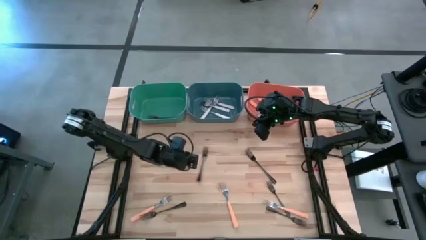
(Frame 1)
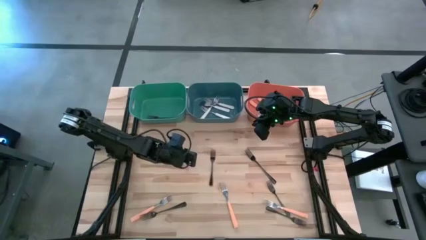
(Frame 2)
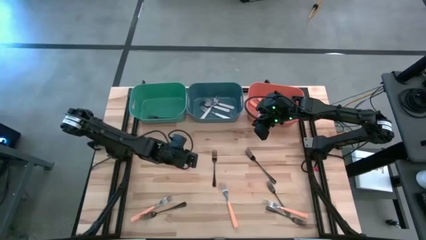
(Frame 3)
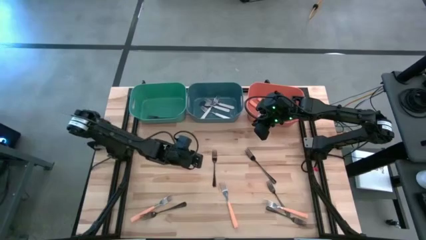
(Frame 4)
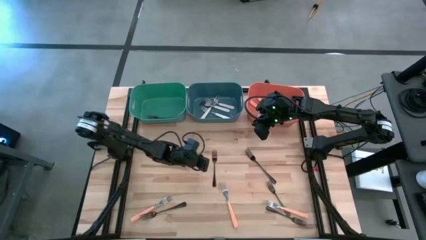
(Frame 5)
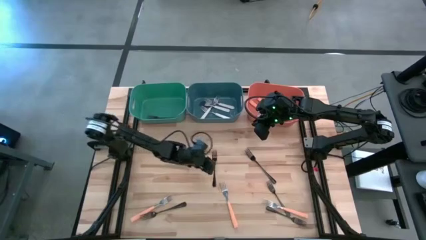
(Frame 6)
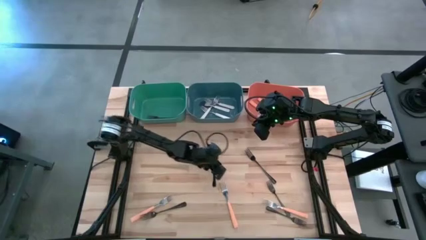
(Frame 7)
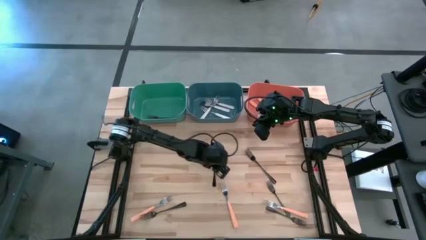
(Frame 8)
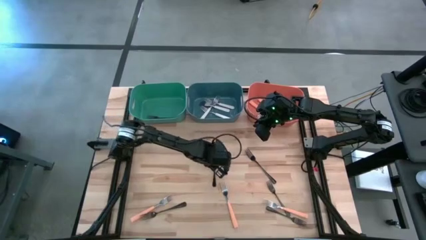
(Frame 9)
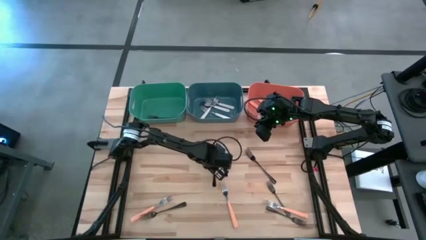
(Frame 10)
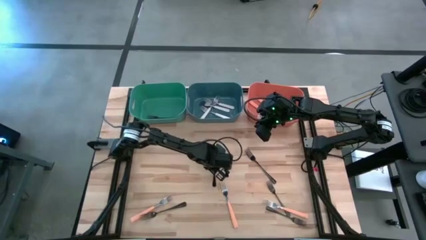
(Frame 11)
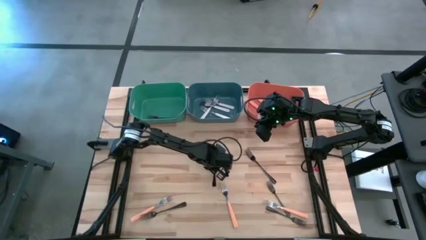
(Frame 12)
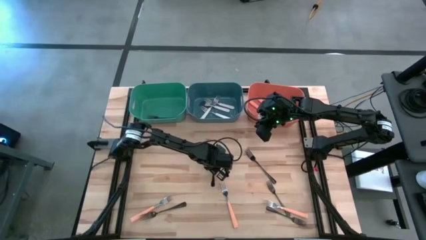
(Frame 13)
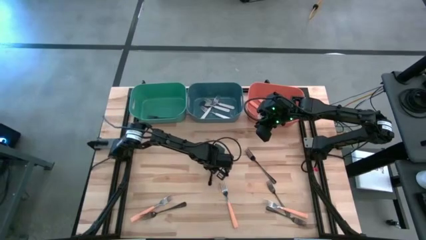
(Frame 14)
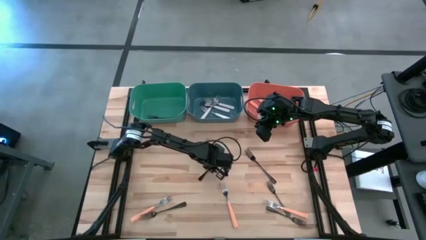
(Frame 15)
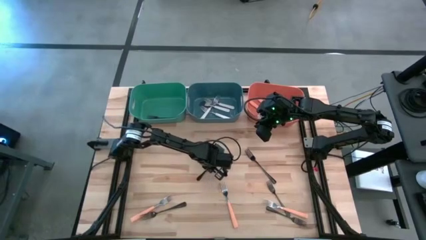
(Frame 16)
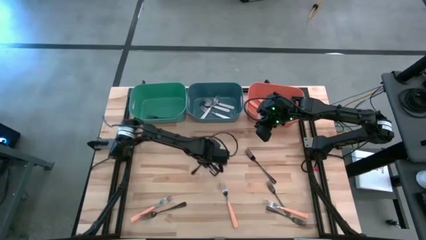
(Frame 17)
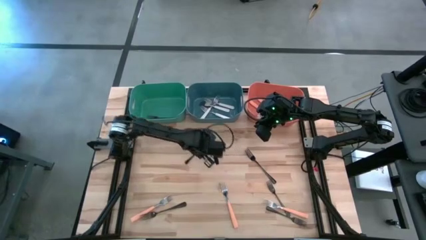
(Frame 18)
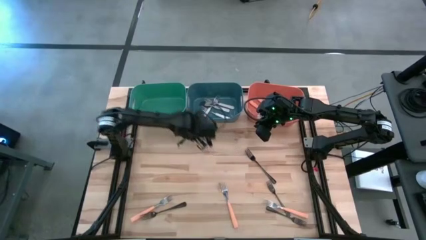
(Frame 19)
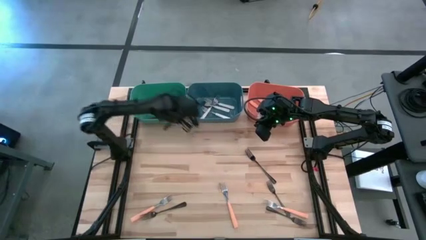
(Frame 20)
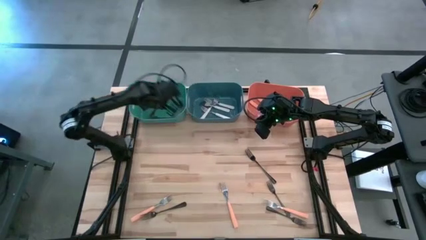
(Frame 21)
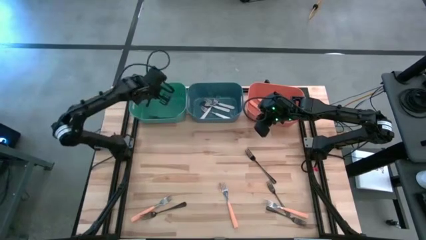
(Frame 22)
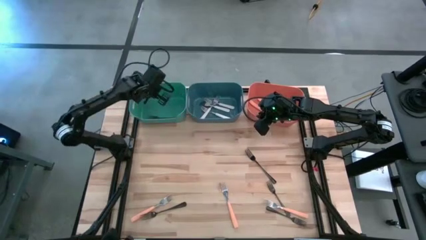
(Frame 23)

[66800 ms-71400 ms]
Task: Sort silverware by color (type)
Put the black fork into the green bin

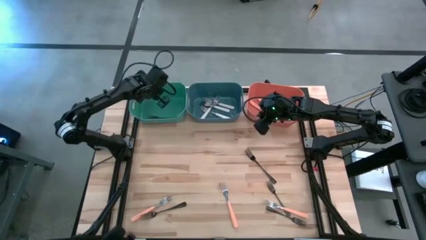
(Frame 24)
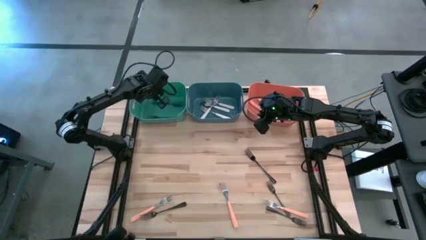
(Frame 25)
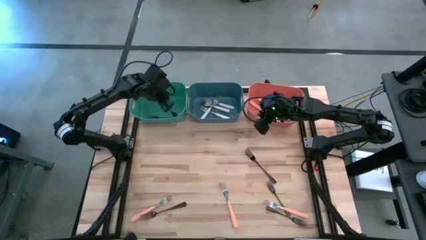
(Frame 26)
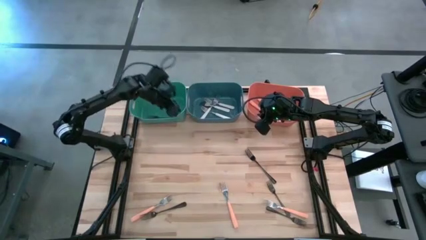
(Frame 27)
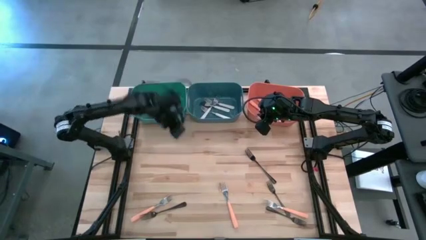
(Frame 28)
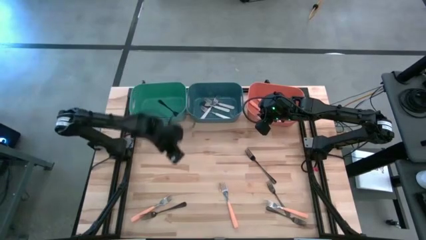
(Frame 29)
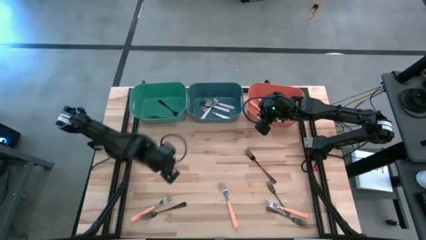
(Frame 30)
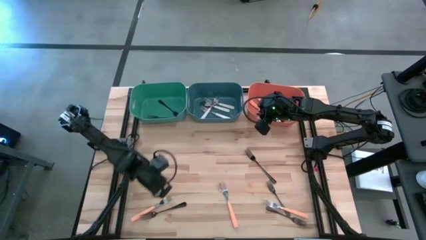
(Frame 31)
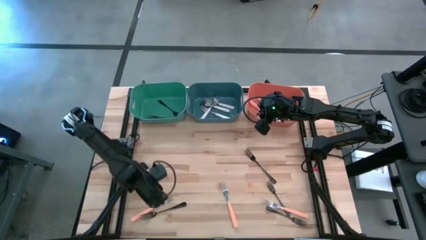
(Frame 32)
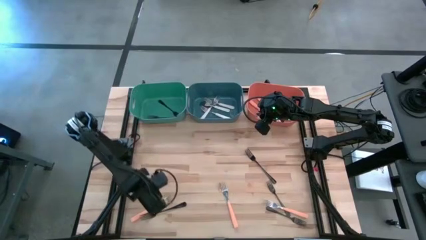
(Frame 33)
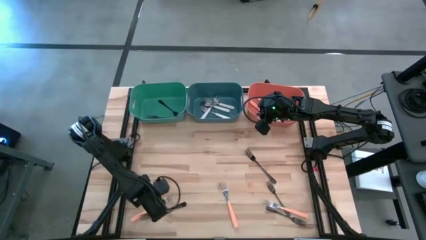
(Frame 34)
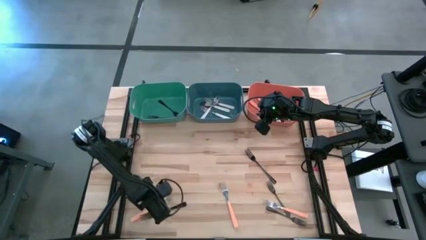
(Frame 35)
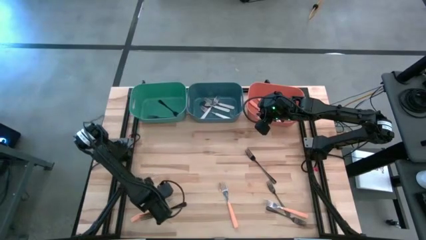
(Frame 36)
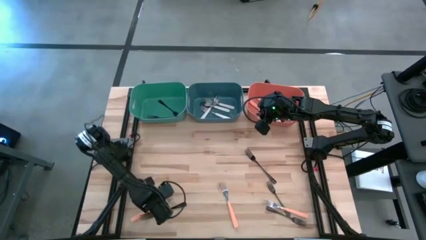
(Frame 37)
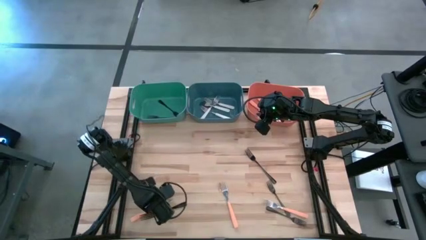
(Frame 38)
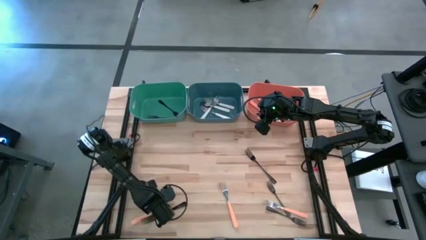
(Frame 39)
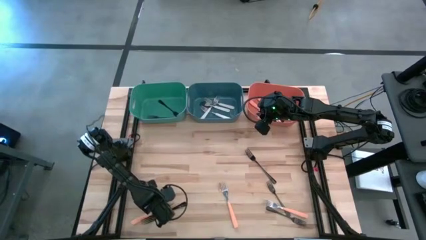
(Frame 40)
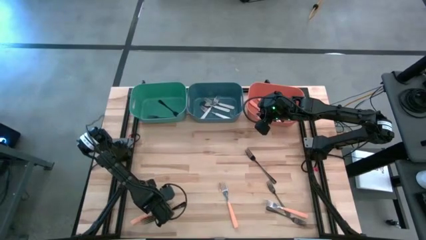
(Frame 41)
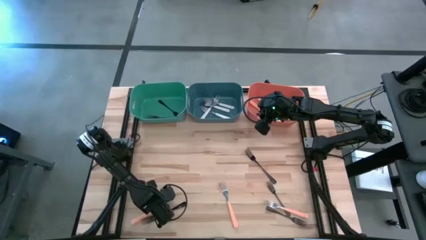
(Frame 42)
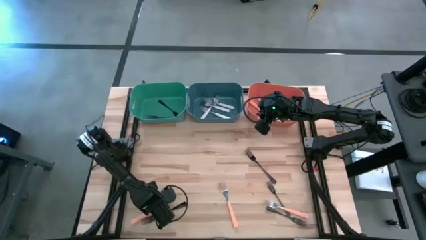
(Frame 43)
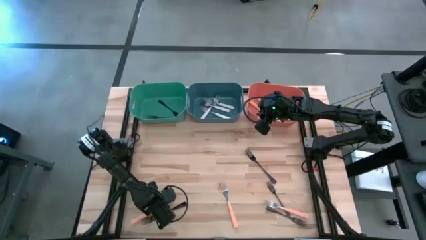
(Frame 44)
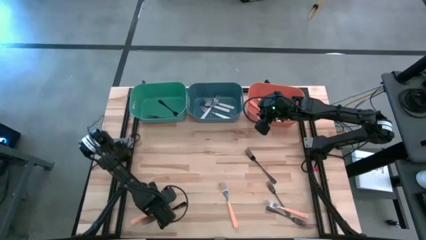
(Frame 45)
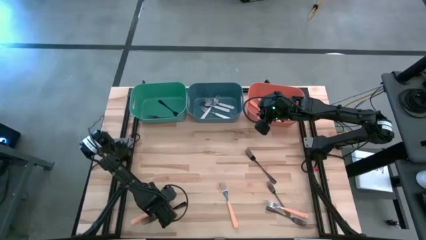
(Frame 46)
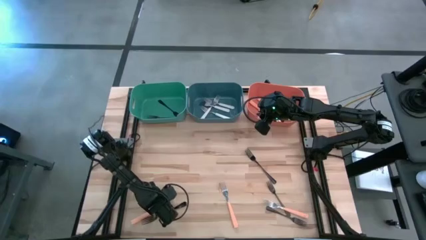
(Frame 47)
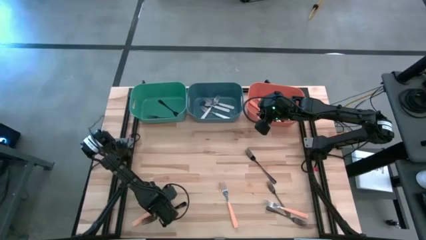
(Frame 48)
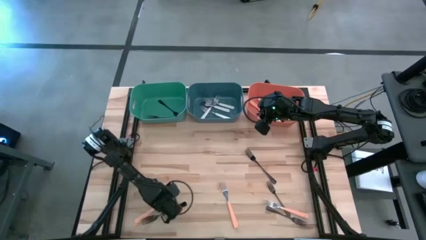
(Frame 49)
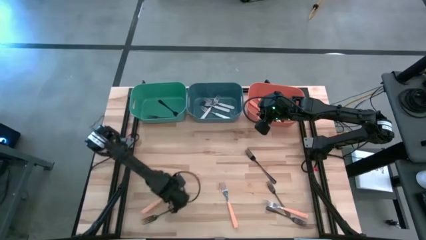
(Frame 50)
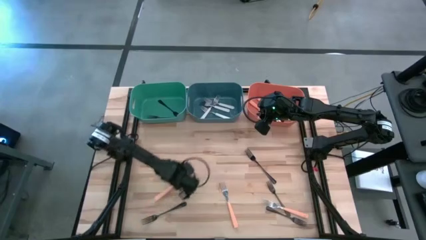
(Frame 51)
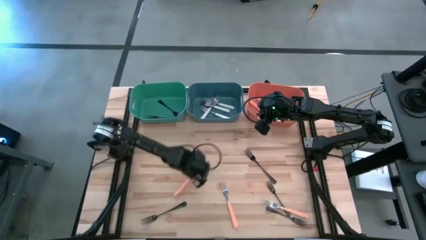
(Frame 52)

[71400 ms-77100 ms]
Put the orange fork into the orange bin

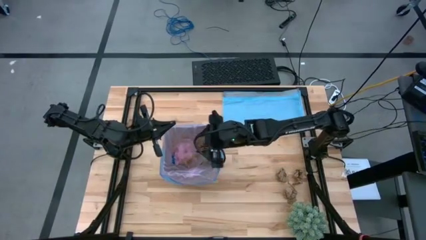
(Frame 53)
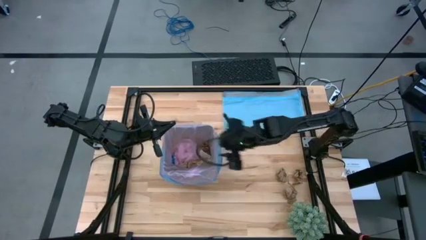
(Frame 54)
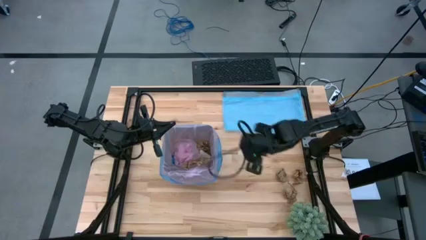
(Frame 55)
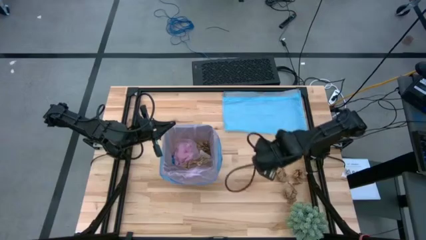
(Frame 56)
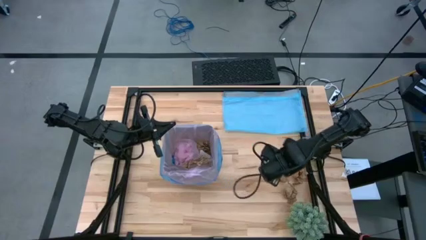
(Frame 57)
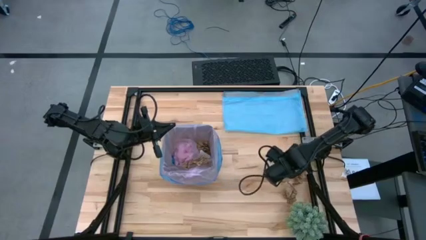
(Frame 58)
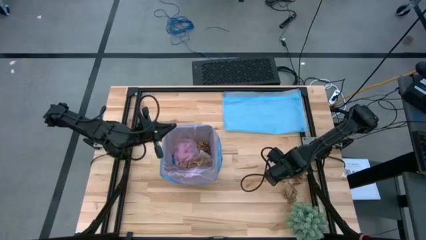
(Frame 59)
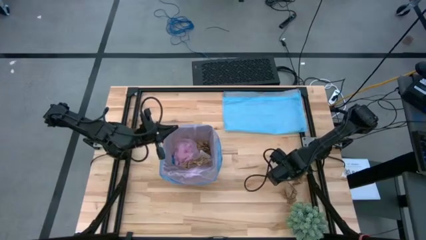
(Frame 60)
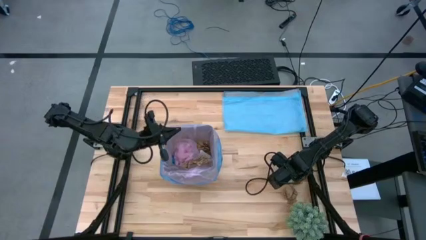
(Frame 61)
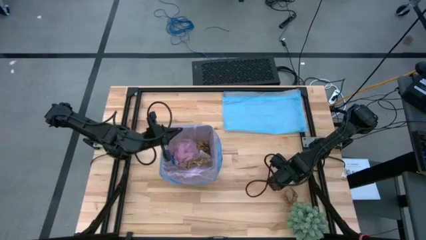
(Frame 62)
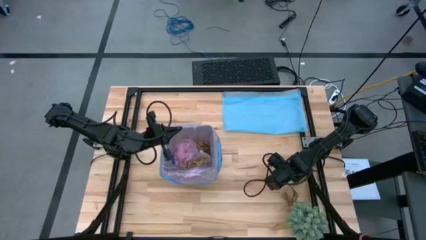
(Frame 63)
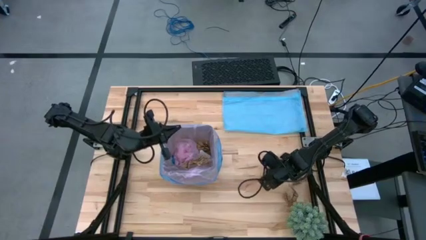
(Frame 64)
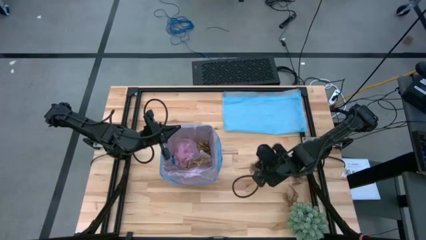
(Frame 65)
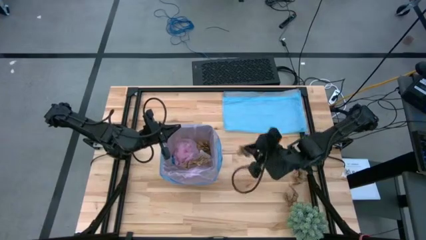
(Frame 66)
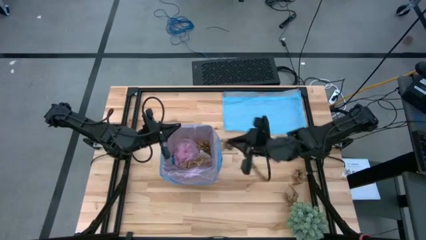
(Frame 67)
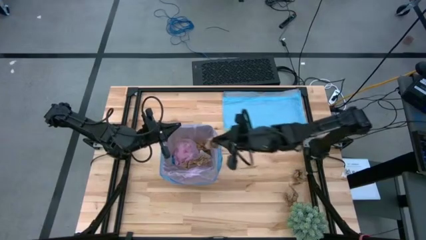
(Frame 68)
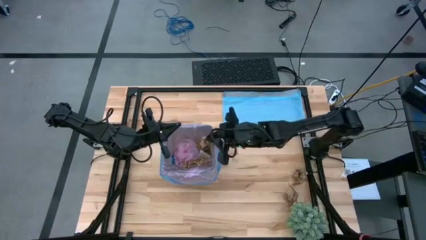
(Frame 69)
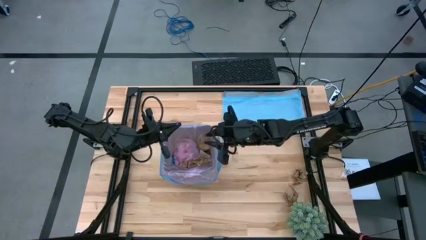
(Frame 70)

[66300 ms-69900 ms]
Task: place trash/remove bag and relplace
Put the brown napkin into the trash bin

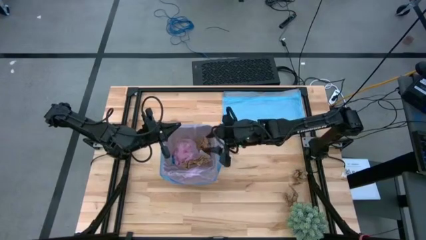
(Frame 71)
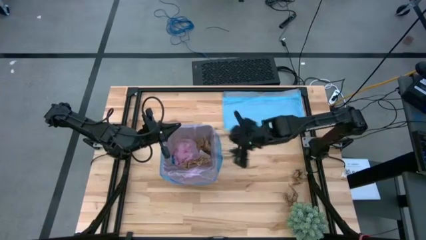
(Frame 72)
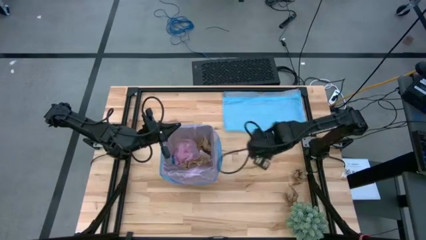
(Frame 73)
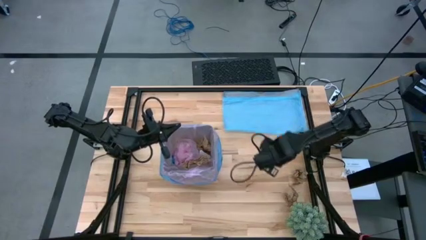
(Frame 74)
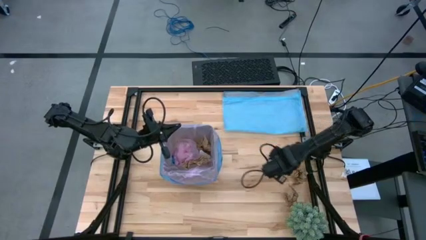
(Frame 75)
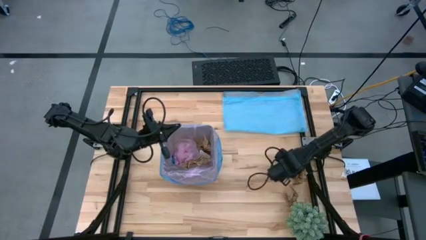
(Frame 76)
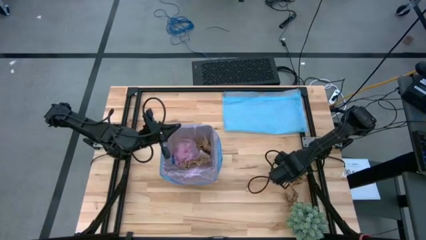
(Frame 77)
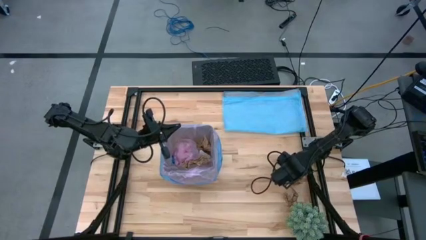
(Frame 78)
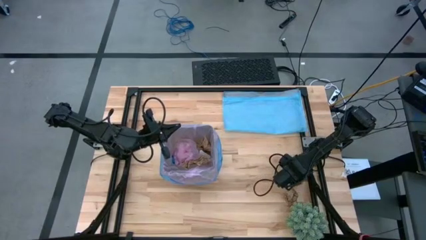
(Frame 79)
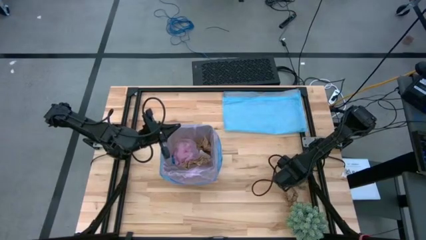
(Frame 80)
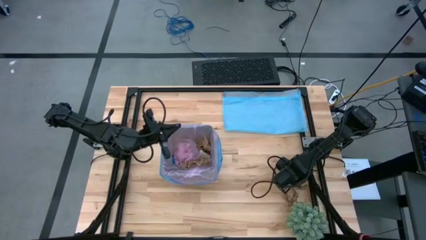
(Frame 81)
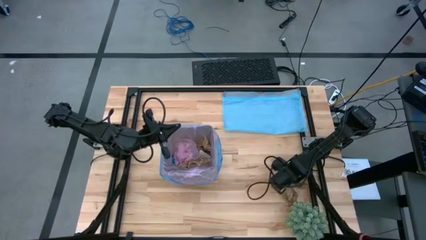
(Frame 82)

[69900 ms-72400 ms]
Put the brown napkin into the trash bin
